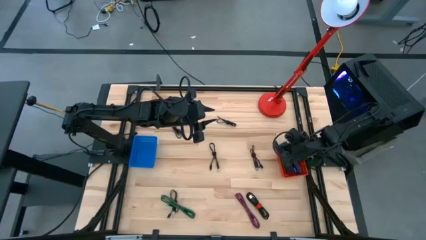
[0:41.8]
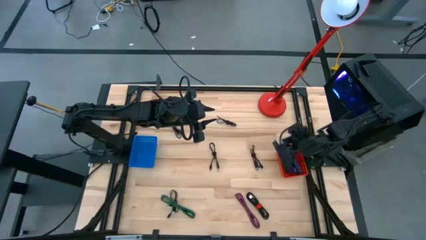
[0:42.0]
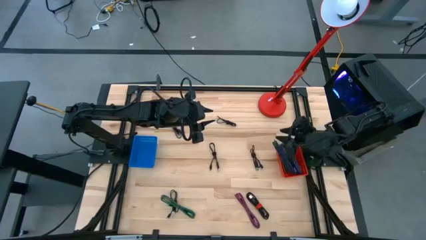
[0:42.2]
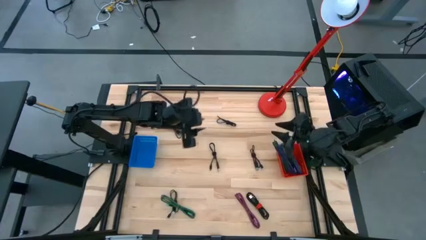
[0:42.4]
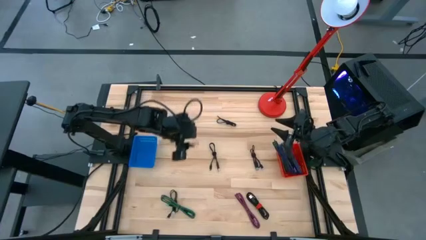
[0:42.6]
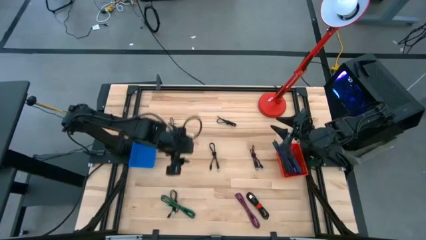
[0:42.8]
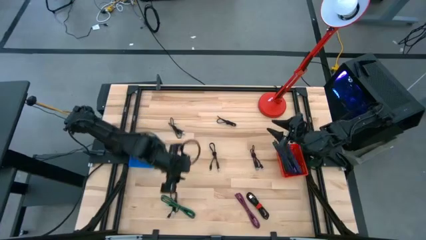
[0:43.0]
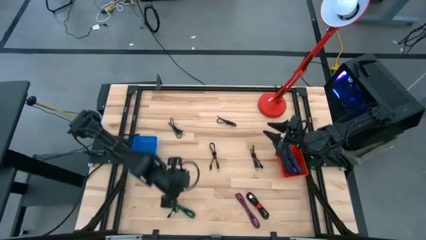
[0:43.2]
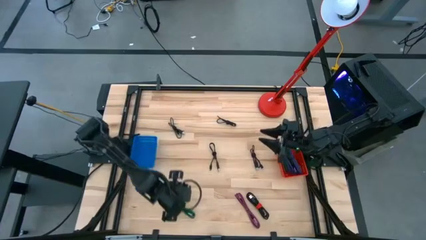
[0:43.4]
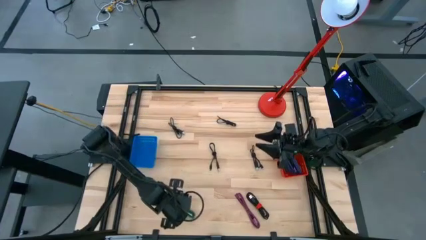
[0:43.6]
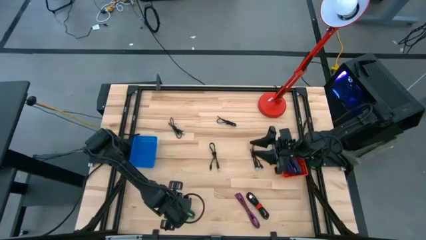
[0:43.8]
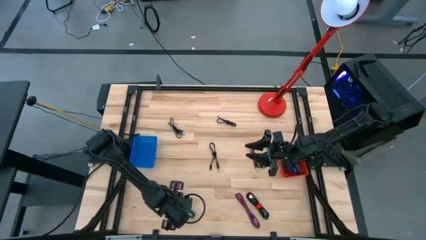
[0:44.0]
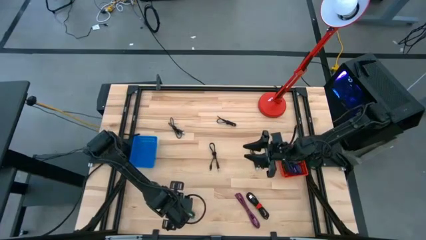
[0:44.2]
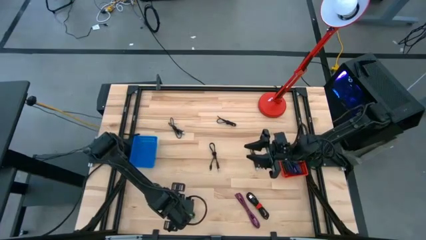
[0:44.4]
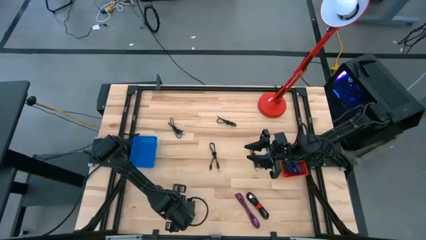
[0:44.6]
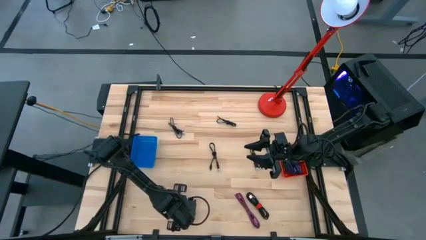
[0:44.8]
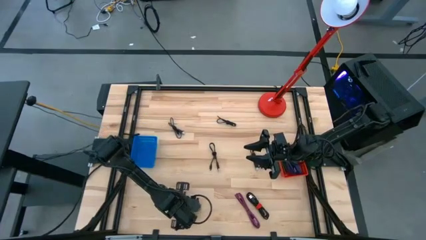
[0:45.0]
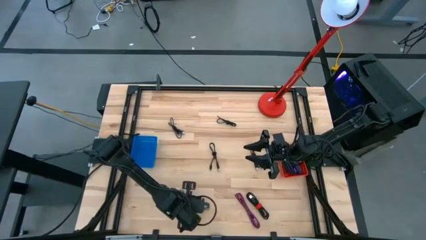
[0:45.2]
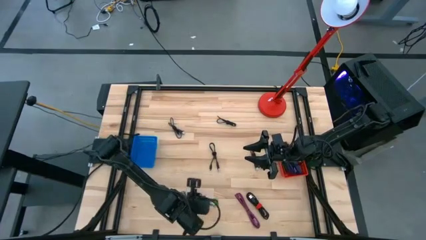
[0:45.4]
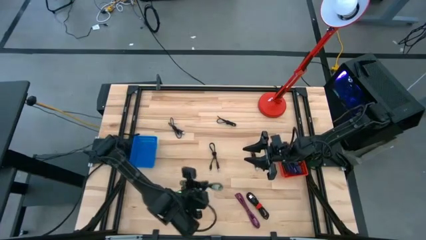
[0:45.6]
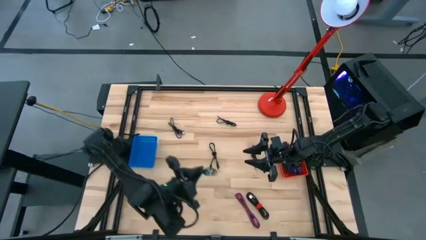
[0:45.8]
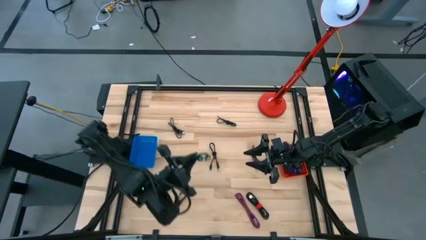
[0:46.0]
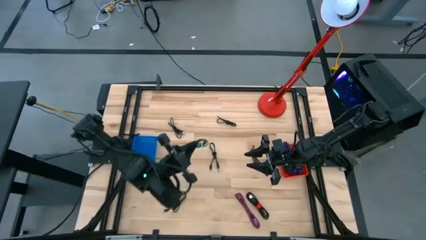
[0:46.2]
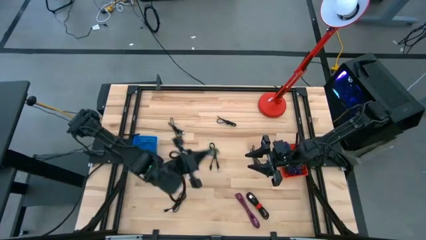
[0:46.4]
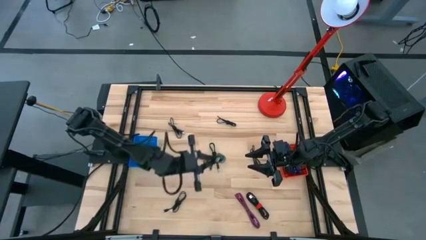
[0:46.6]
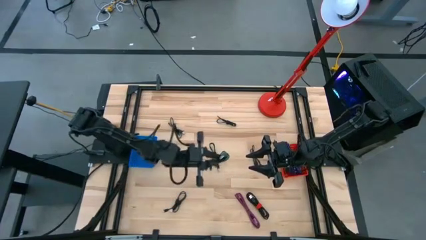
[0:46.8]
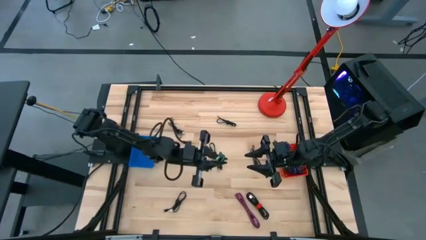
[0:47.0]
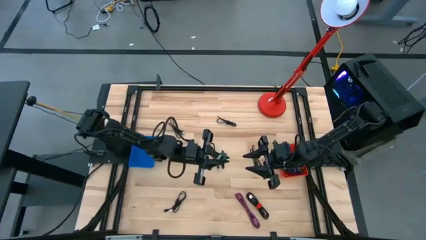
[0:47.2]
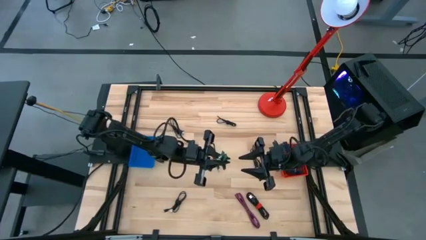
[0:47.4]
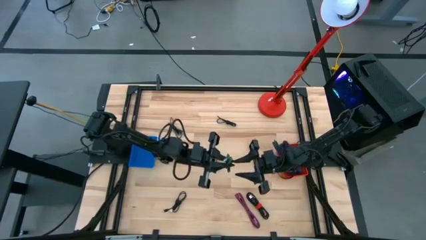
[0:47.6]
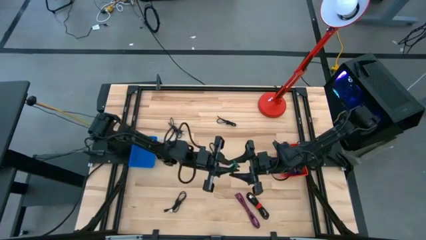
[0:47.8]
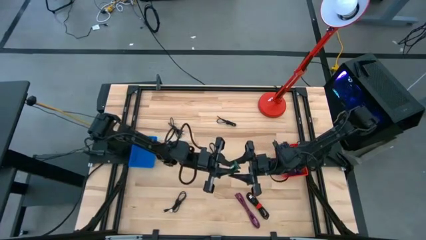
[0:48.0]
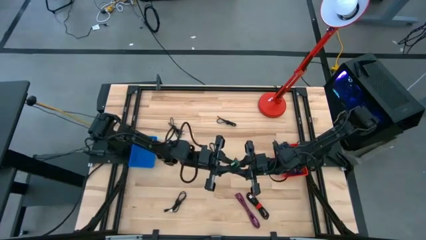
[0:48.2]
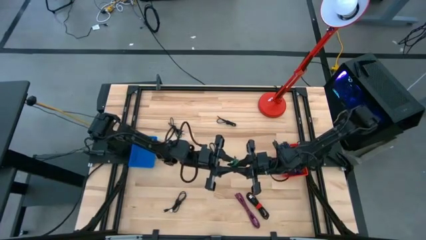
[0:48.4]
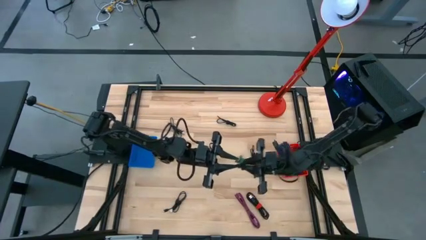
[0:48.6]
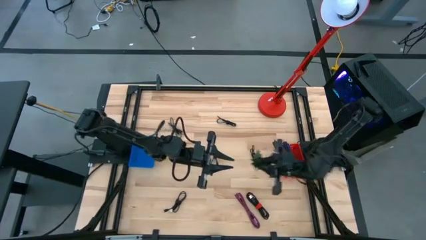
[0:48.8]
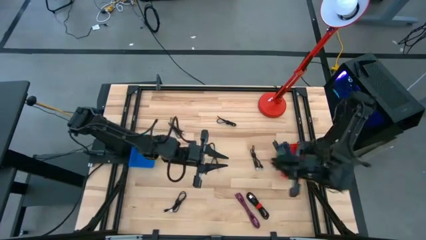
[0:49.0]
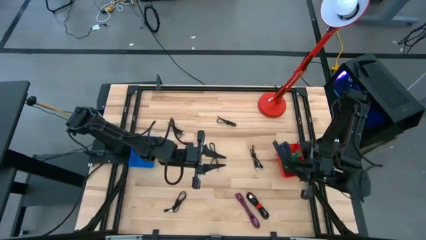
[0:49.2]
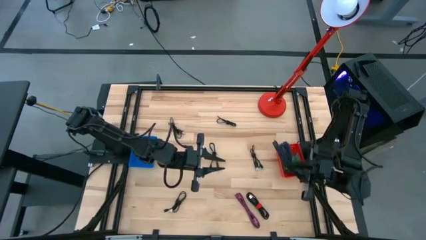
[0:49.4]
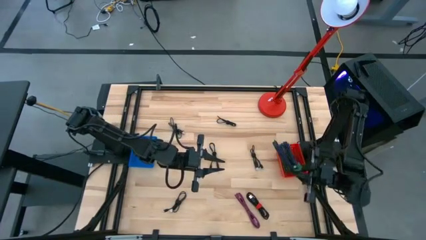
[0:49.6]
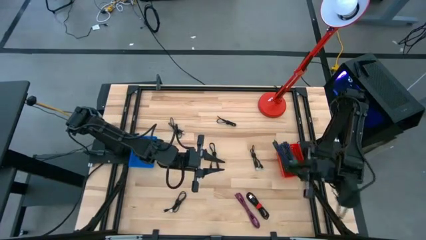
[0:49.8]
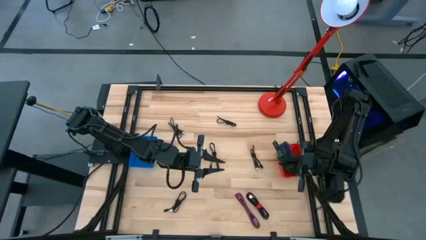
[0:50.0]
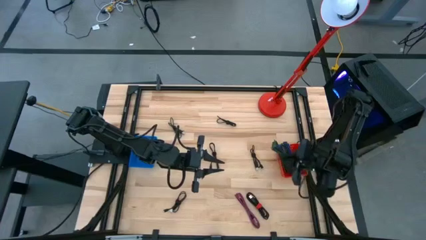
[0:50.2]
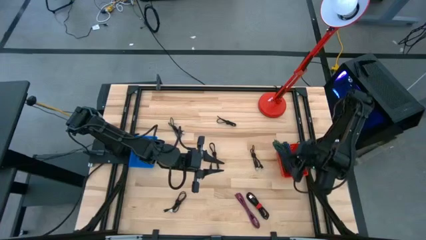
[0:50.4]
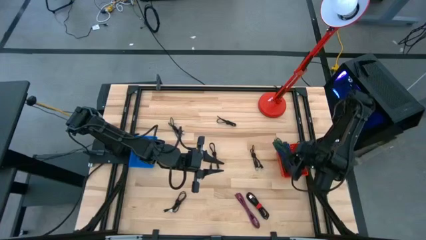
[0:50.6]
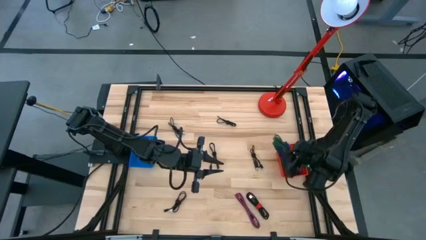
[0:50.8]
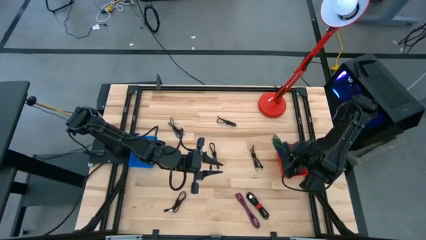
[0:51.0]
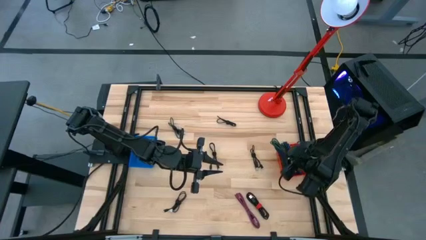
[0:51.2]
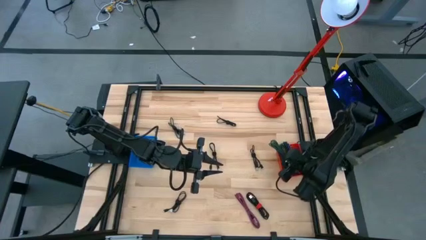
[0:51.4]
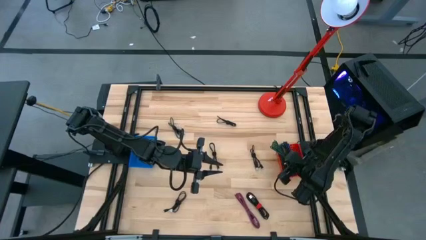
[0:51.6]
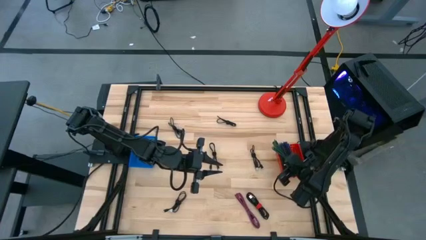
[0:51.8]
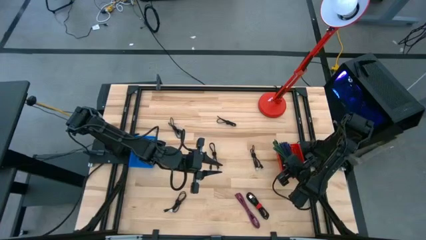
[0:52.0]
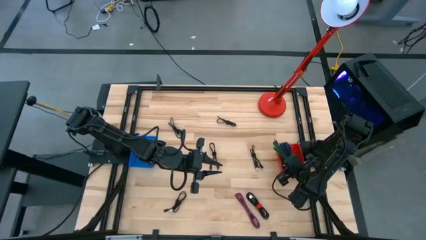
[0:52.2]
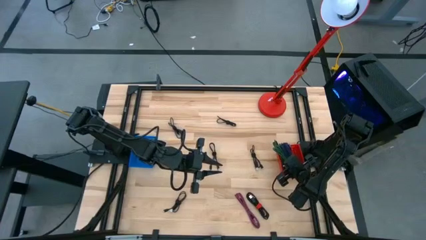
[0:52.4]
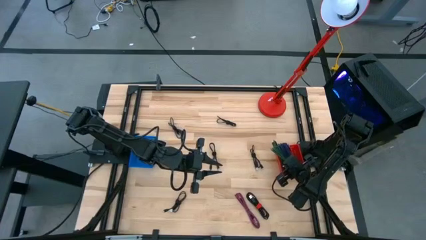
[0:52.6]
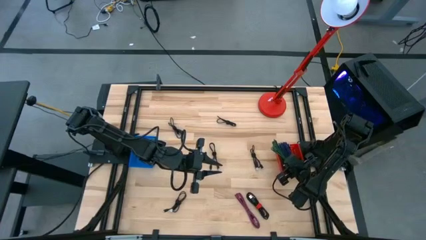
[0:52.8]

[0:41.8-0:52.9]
Task: Pick & Place USB Port
Put the black and green charger cable into the red basket

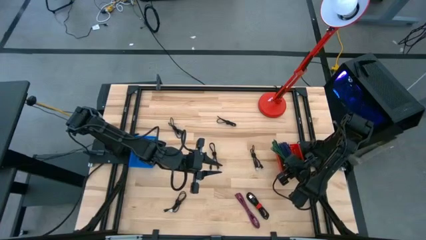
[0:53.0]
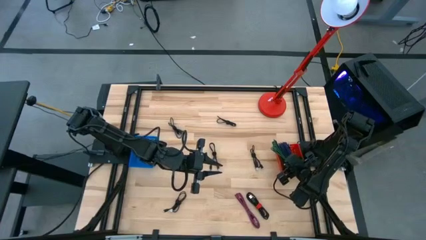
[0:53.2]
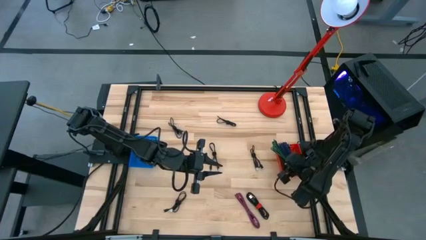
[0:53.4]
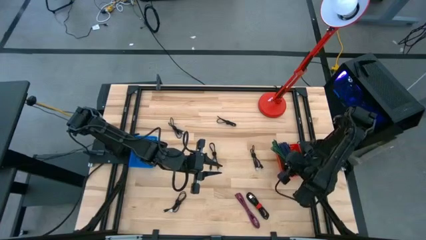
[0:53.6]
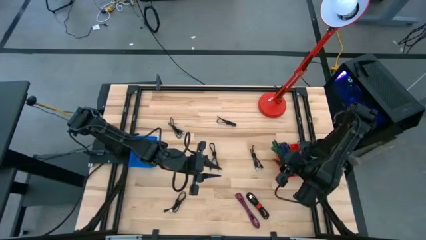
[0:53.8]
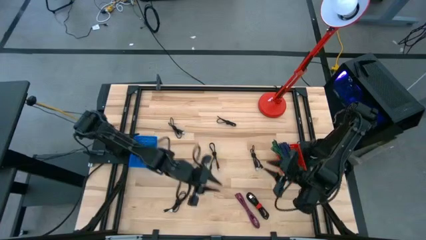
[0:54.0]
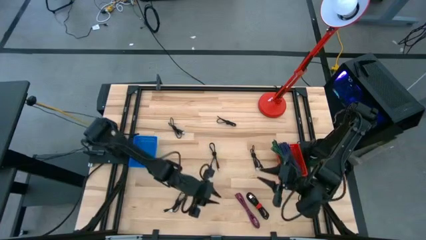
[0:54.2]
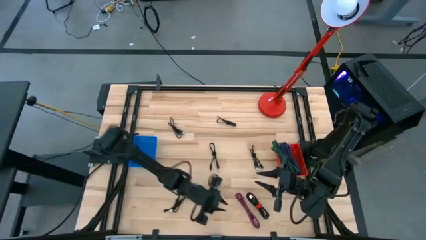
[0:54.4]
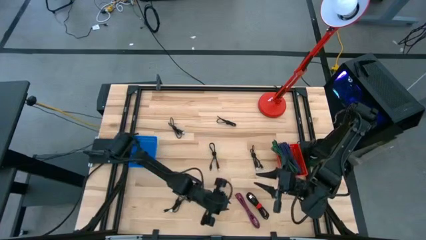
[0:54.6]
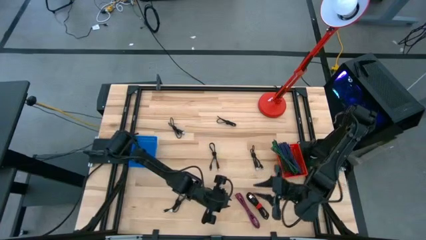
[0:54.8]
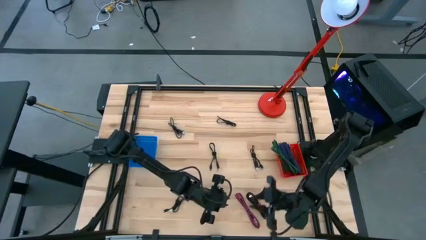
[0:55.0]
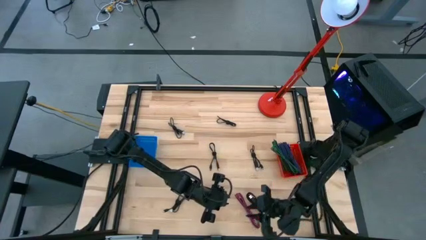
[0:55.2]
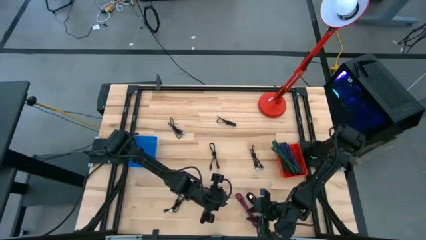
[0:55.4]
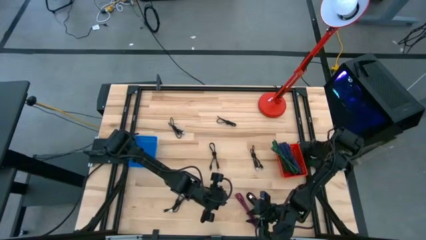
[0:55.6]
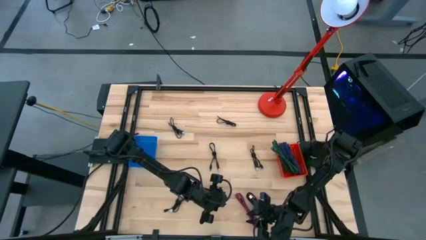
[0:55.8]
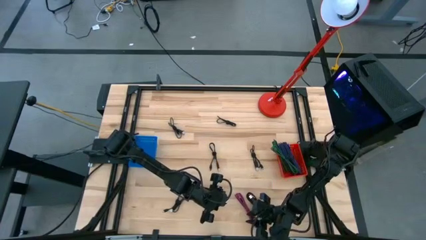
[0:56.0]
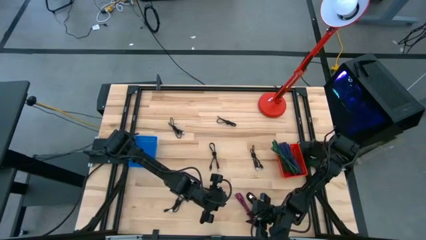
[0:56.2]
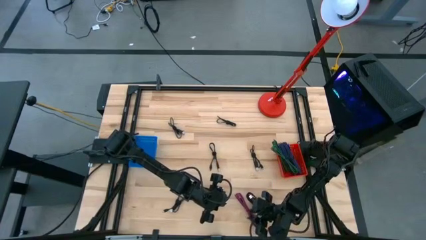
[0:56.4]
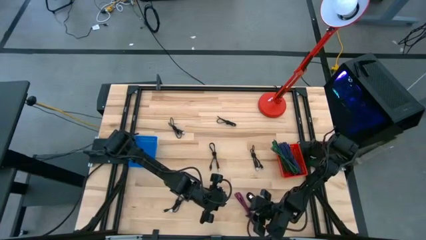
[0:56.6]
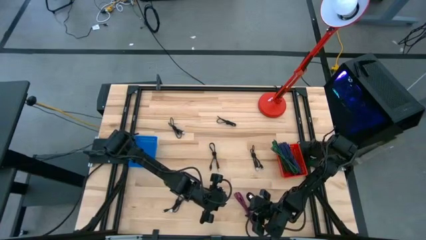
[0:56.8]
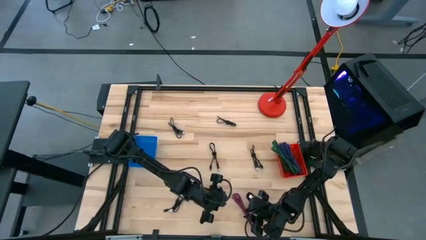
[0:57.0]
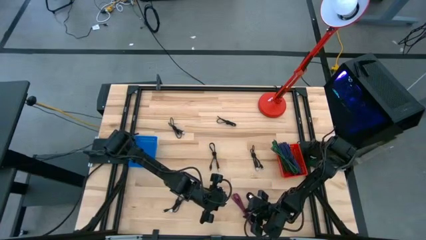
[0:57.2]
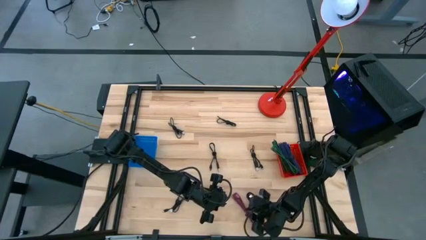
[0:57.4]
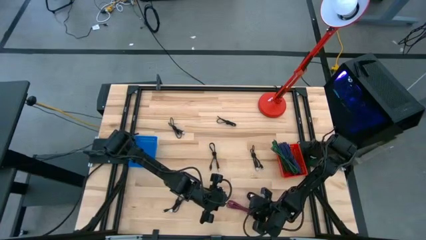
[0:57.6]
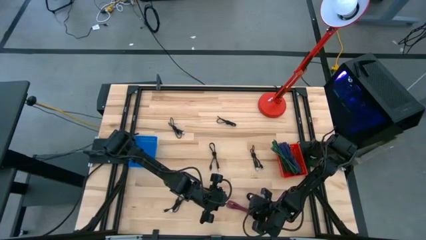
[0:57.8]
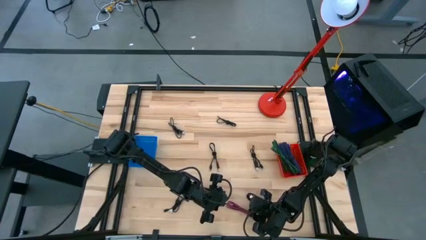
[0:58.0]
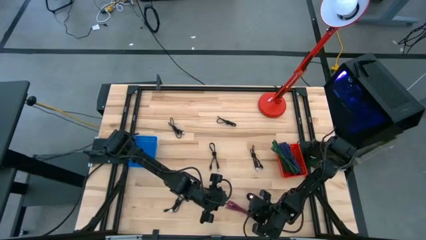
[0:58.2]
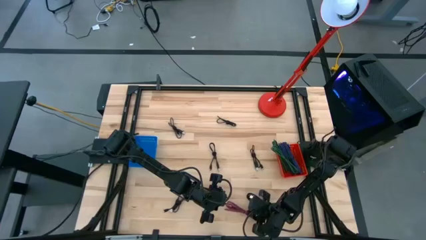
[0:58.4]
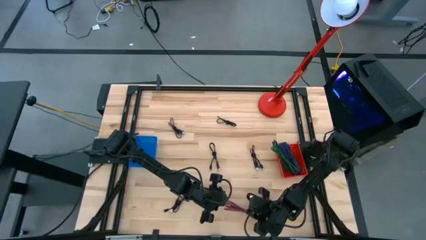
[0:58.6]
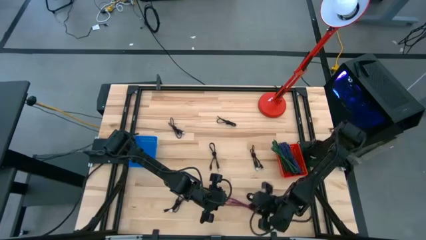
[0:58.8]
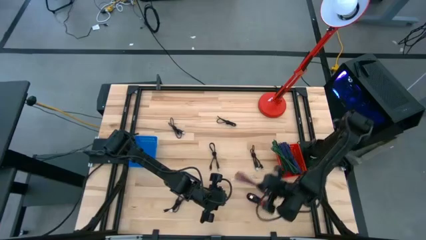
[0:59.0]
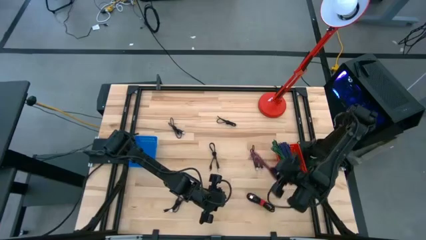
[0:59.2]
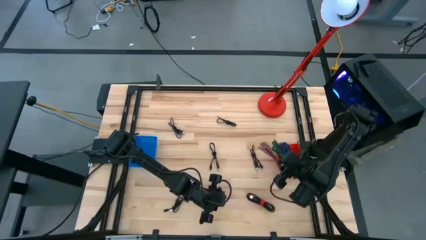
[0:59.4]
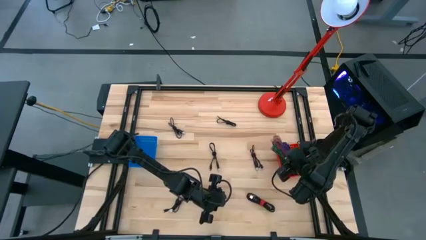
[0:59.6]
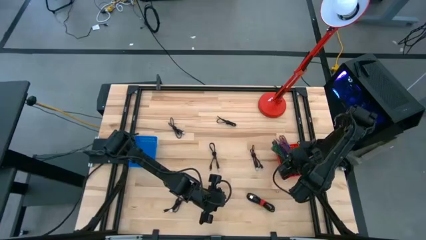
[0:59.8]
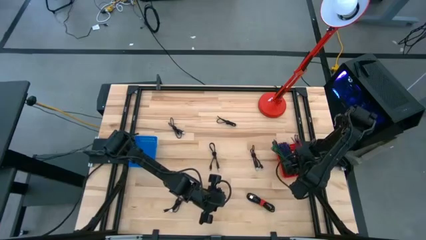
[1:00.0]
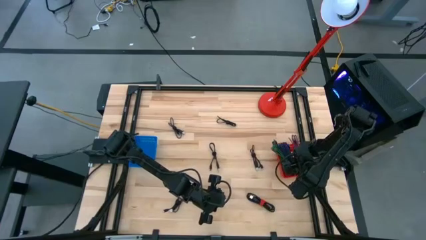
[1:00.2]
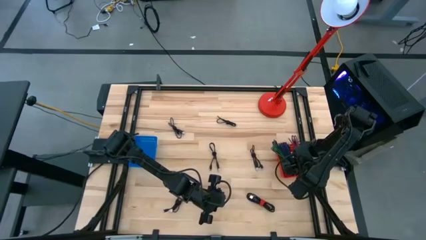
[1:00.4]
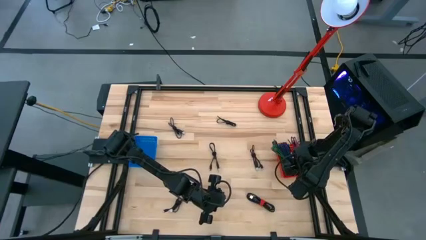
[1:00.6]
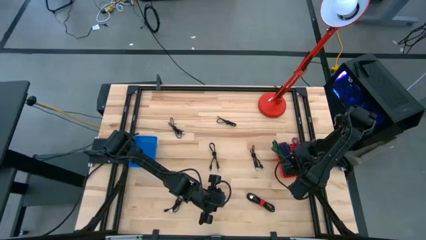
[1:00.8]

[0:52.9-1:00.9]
Put the black and pink charger cable into the red basket
